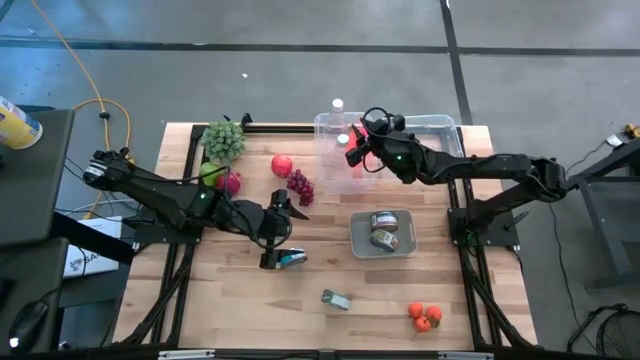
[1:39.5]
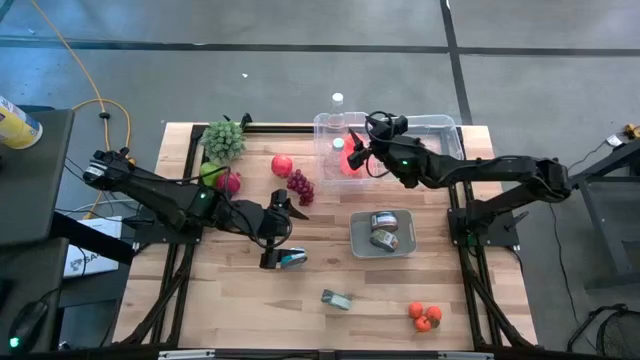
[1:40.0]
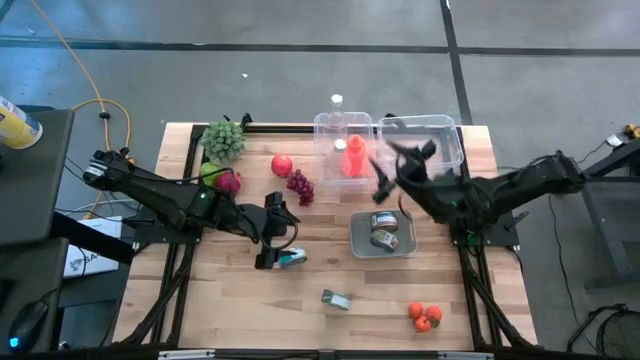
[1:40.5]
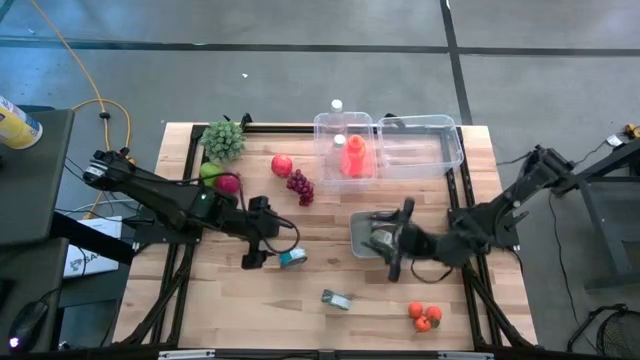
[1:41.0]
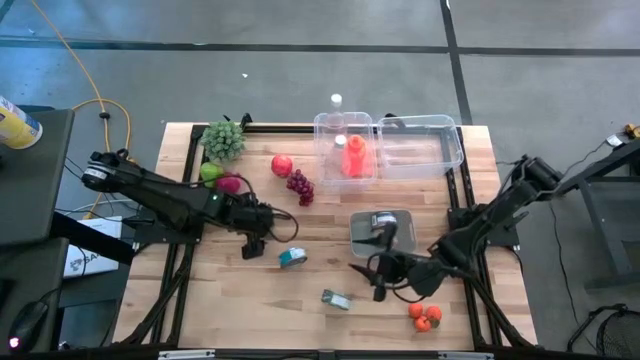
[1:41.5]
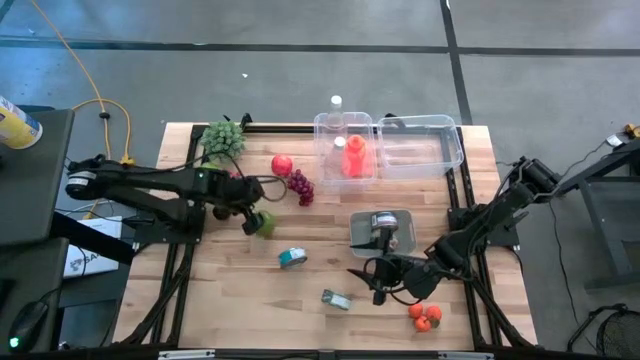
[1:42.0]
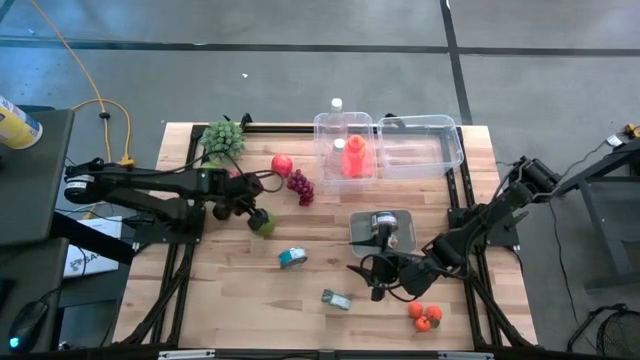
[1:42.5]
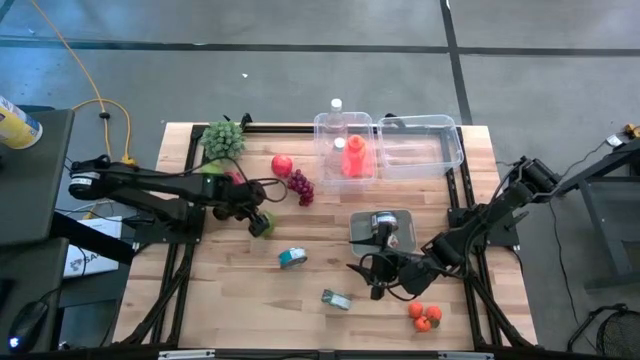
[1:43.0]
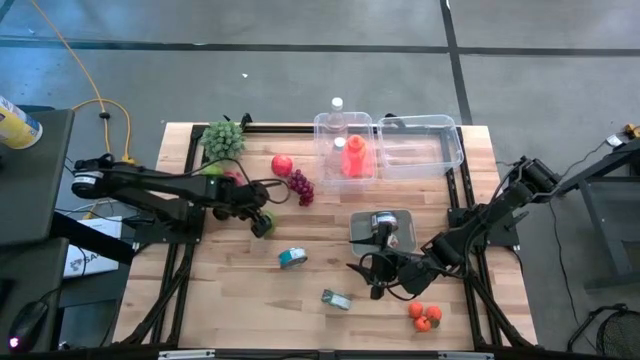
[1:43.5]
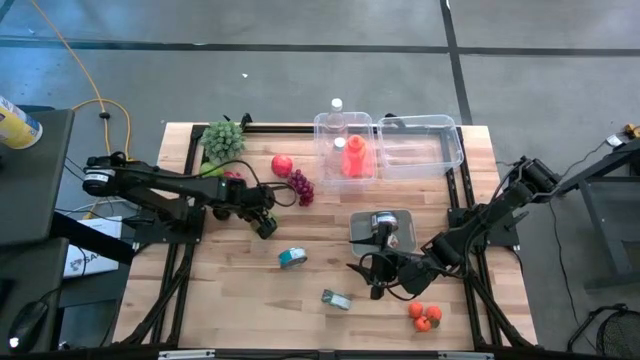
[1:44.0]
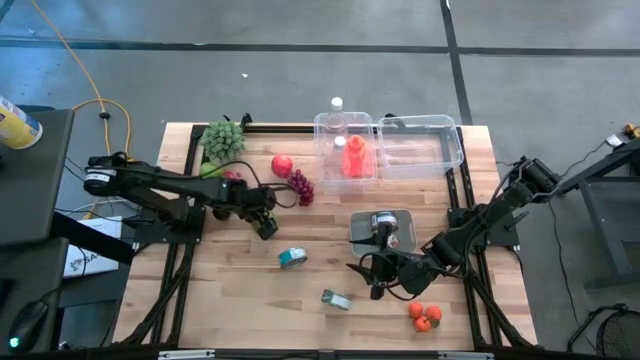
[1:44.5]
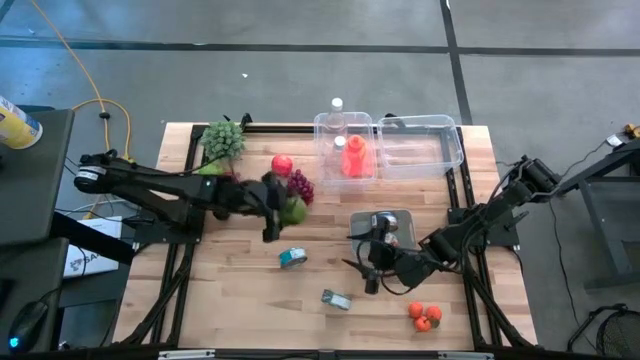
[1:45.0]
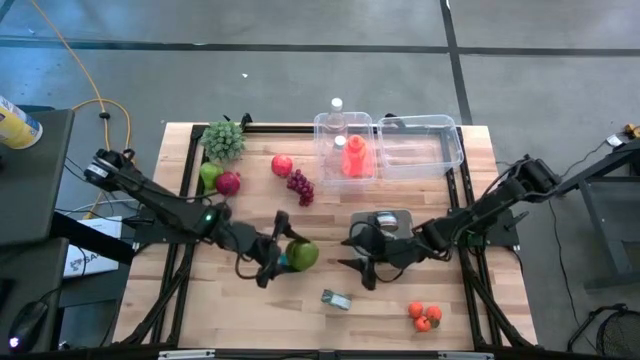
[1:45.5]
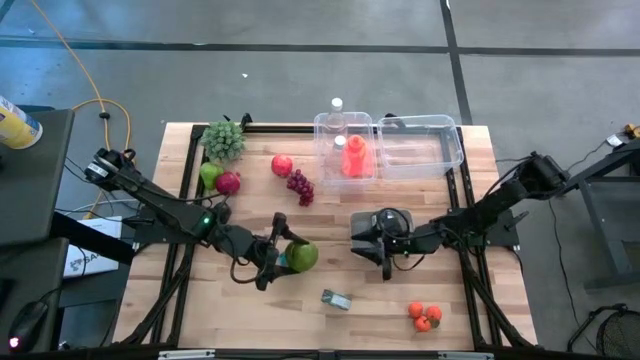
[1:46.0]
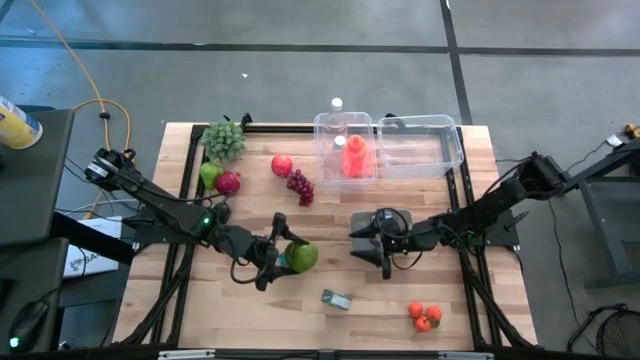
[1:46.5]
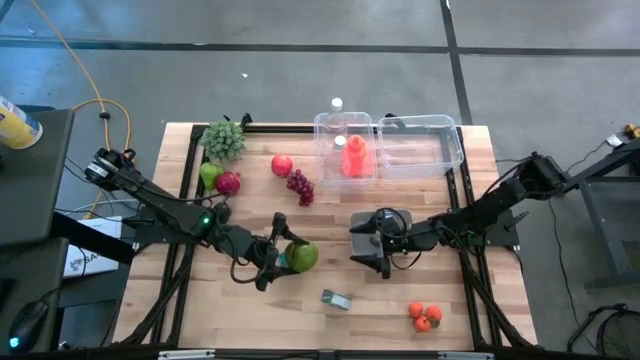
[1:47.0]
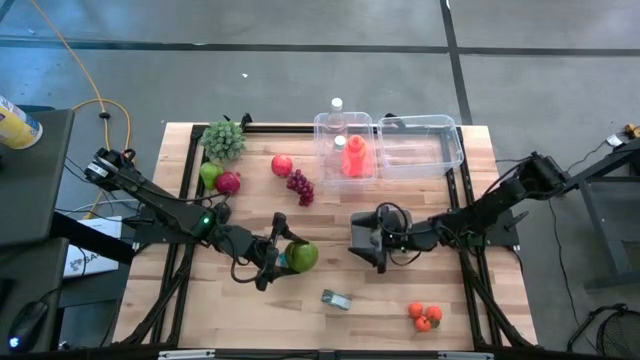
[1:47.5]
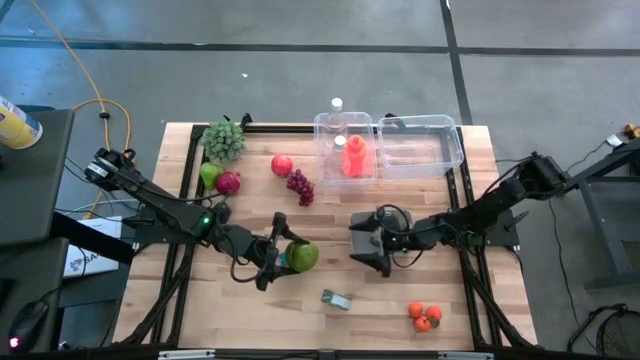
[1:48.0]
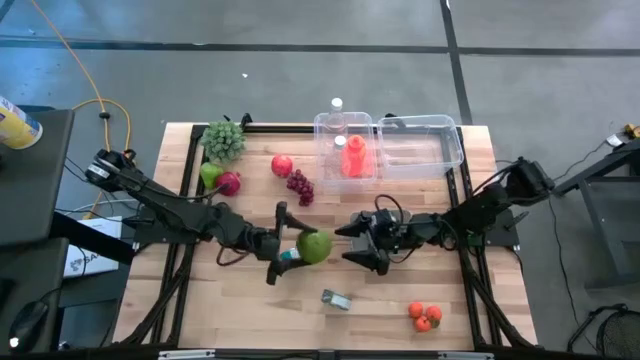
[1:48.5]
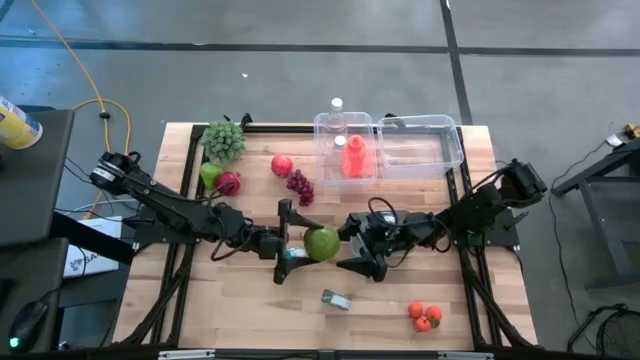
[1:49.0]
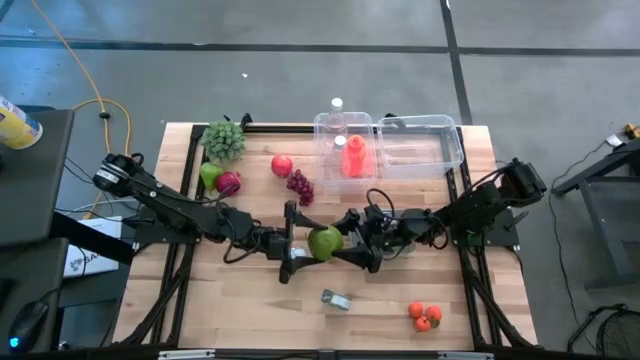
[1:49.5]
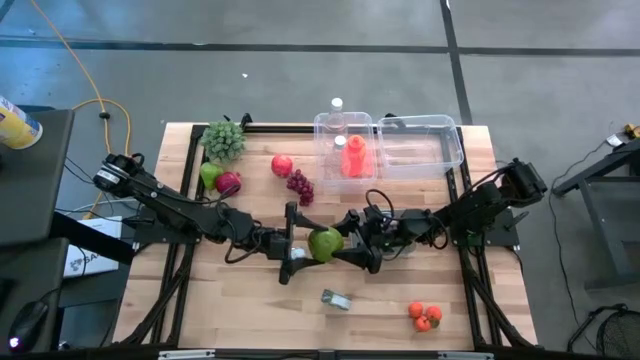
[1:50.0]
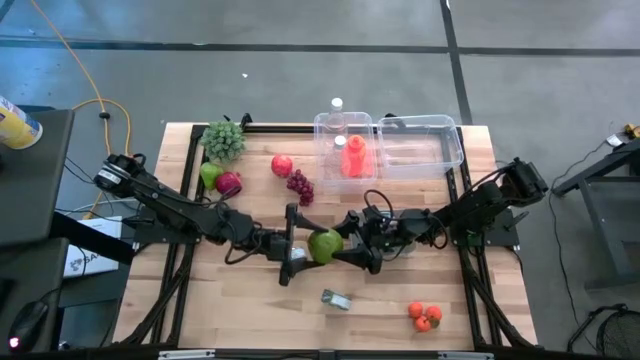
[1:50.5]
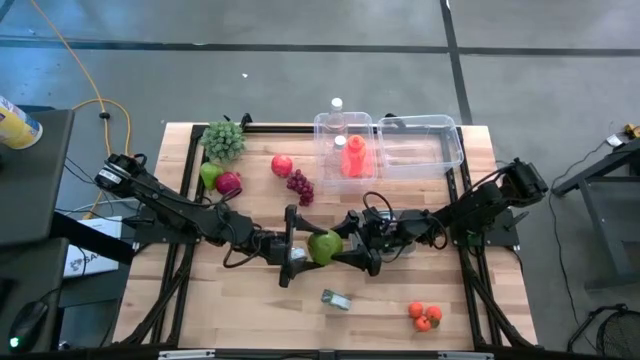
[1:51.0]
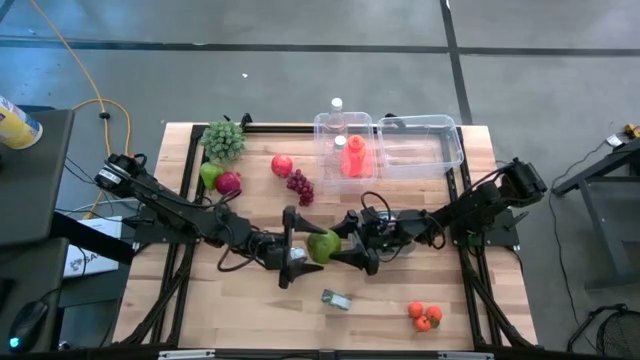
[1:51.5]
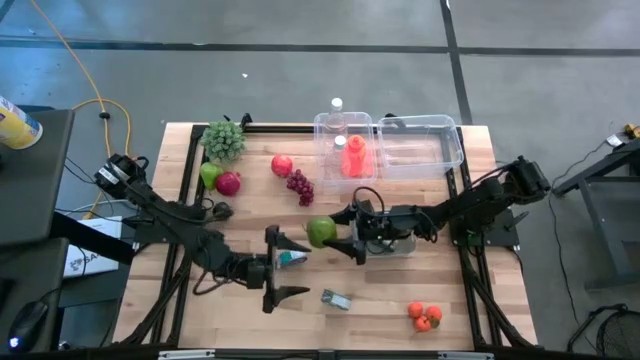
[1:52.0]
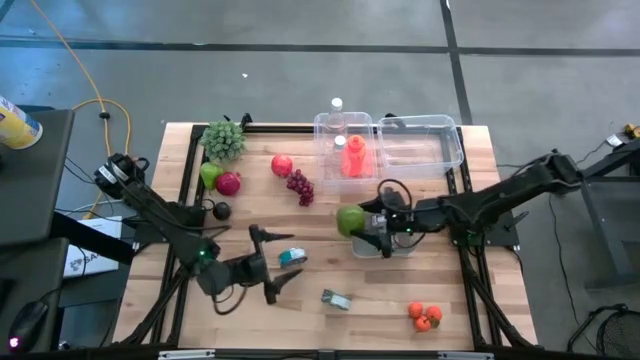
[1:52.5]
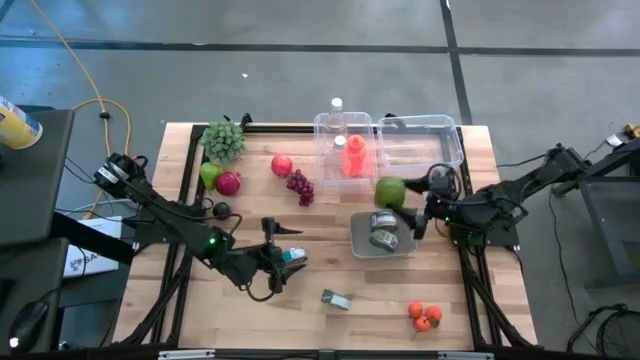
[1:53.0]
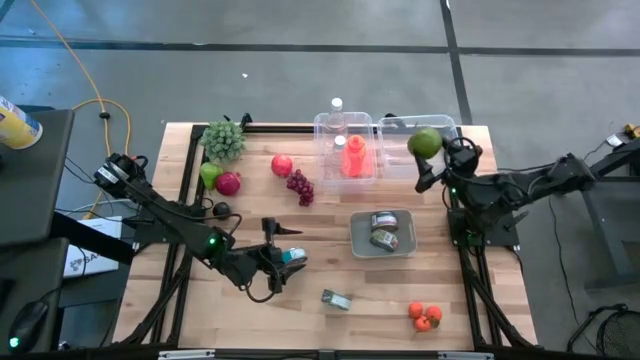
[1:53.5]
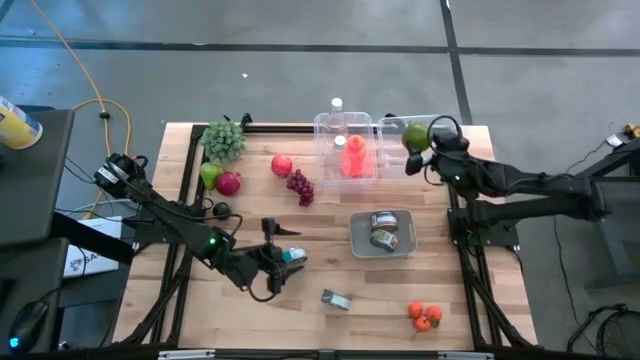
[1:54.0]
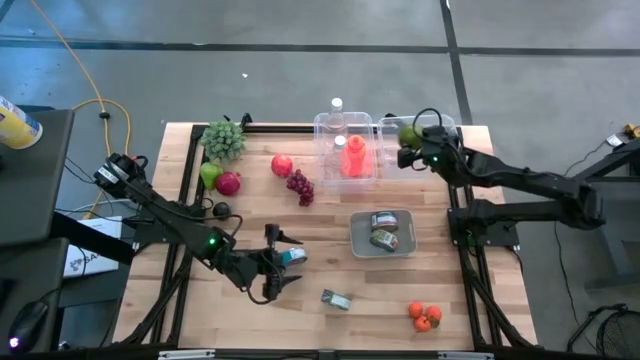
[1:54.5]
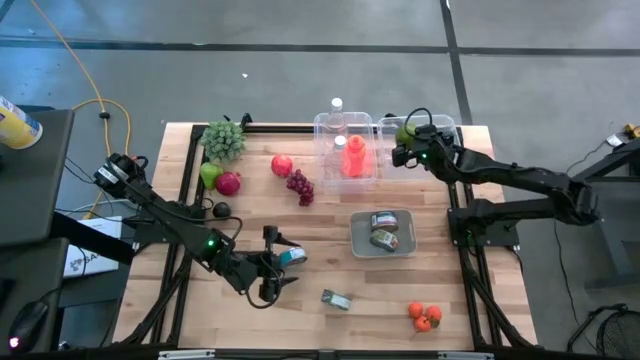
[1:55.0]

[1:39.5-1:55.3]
Task: Pick & Place Food Item
Put the green apple into the right transparent bin

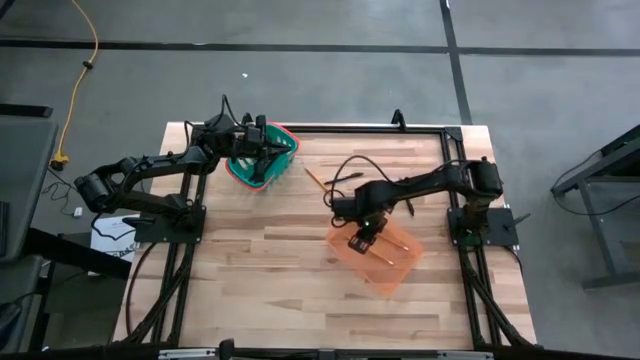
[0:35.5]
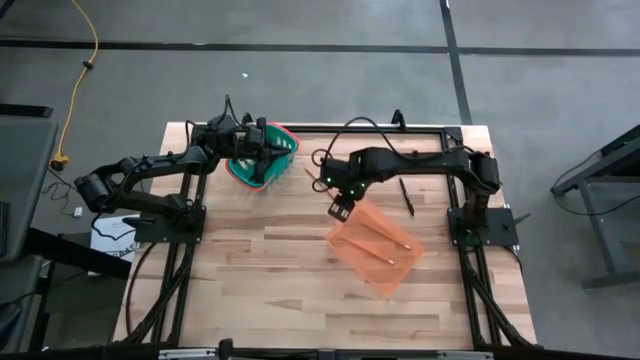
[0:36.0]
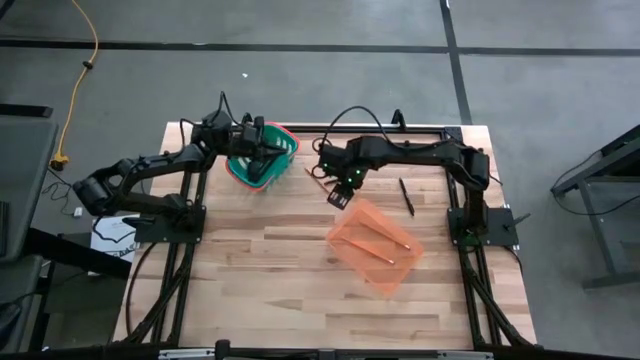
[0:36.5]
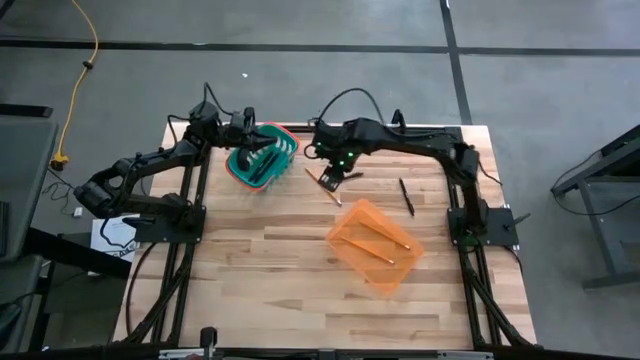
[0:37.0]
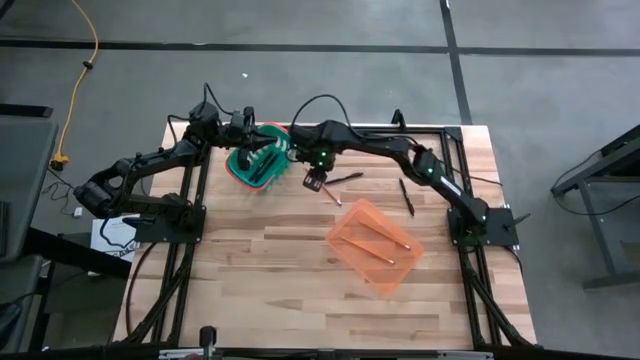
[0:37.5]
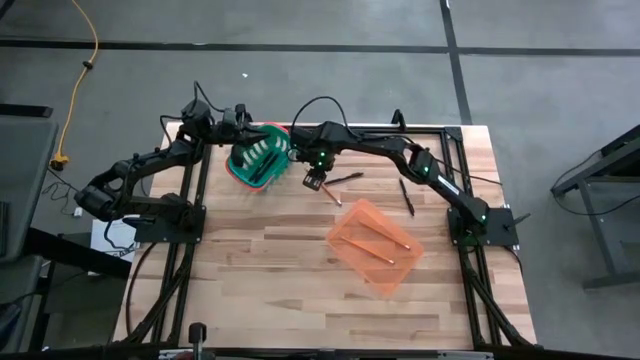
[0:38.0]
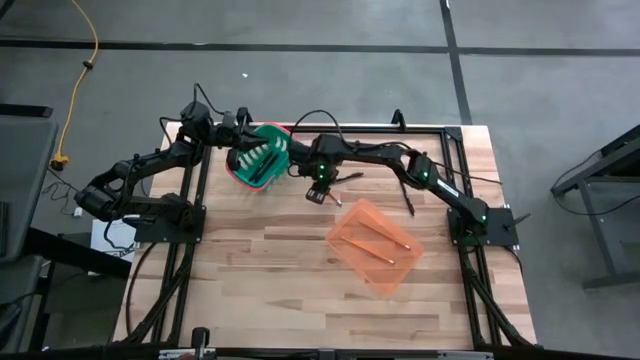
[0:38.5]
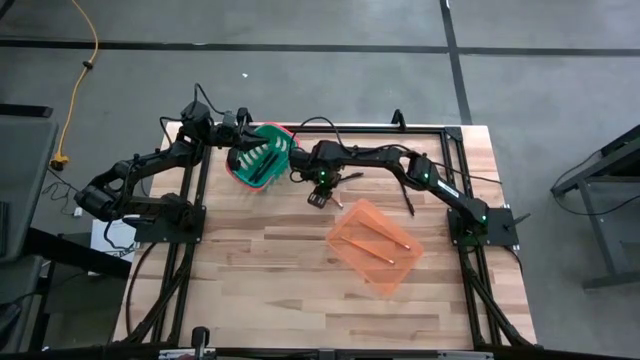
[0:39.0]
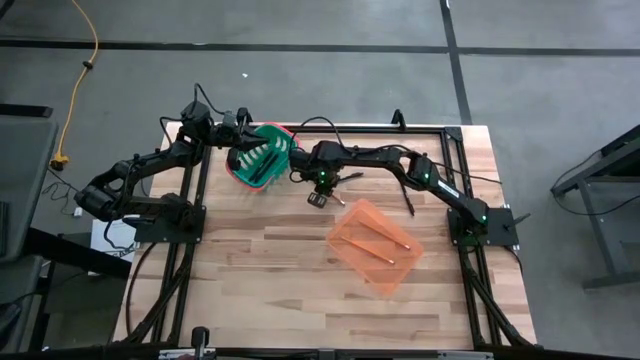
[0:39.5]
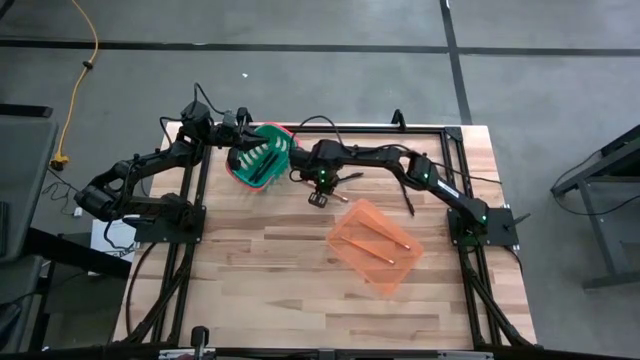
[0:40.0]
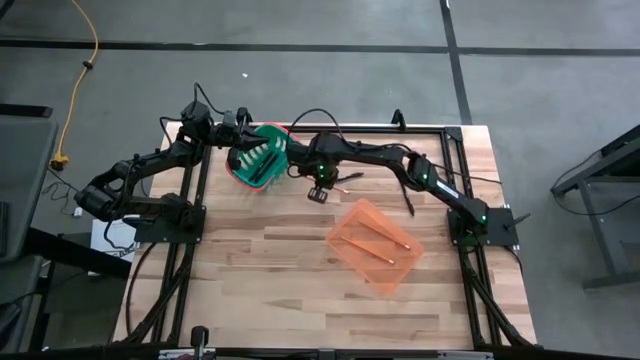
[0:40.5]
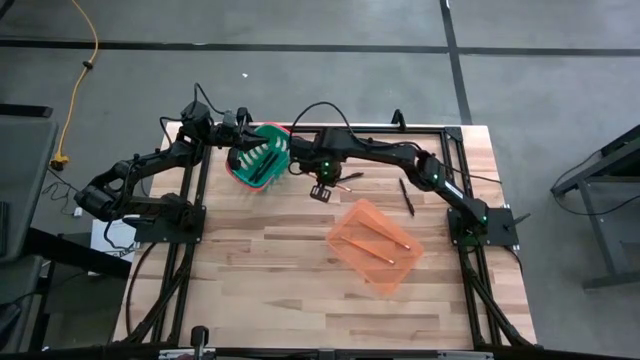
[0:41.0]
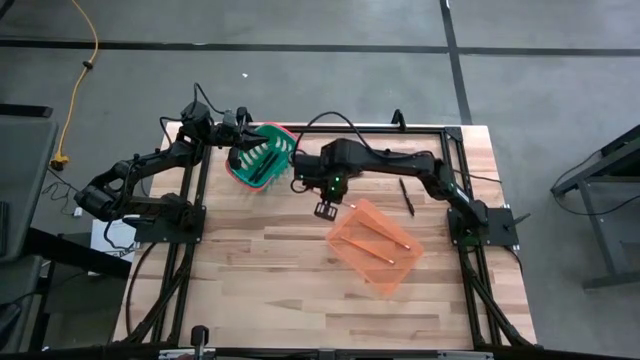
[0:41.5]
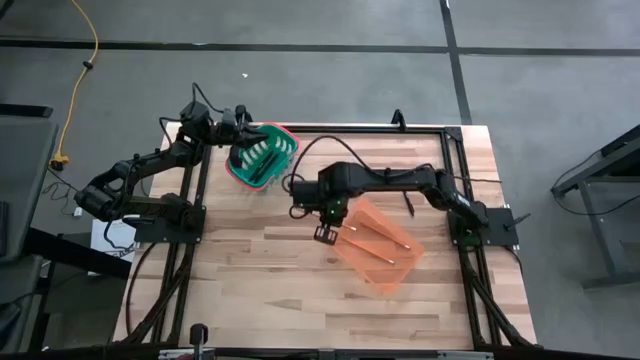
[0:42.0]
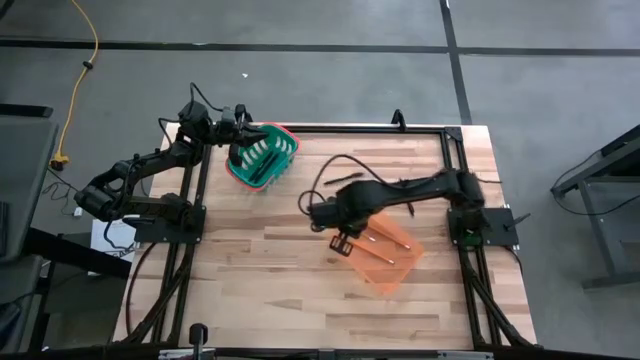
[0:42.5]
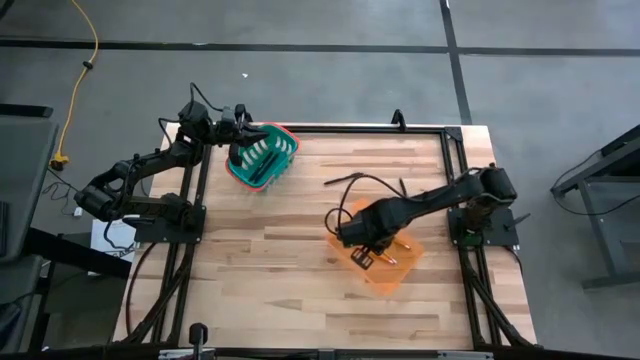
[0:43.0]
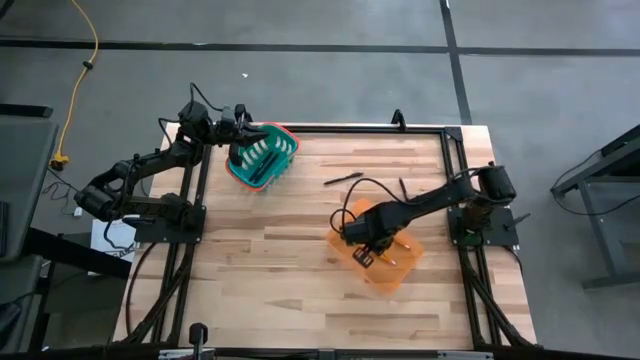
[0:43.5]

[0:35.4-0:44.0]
Task: Sort pens & pencils
Put the orange pencil into the orange bin
